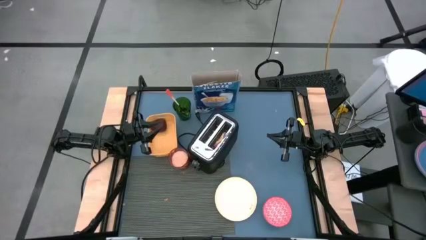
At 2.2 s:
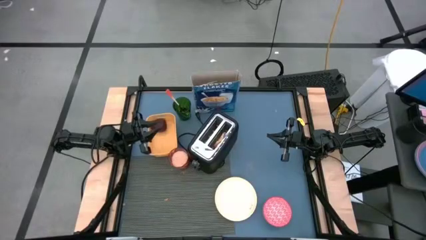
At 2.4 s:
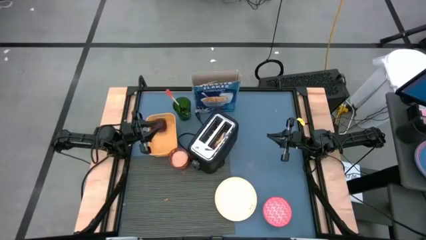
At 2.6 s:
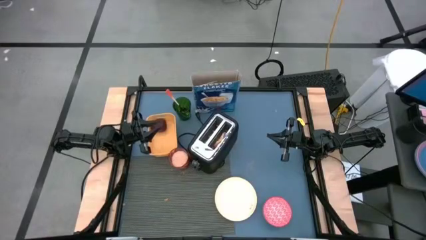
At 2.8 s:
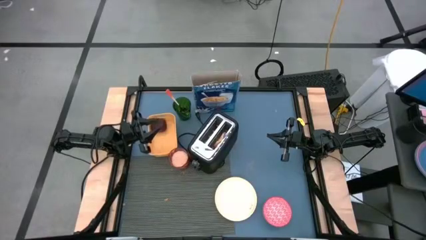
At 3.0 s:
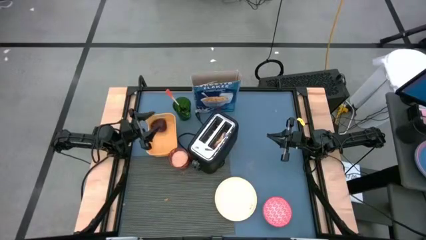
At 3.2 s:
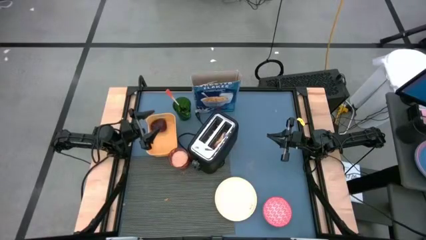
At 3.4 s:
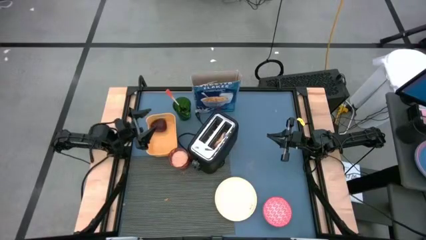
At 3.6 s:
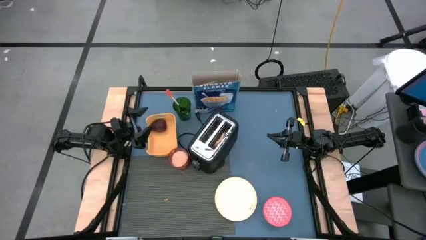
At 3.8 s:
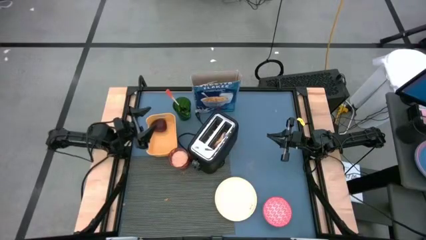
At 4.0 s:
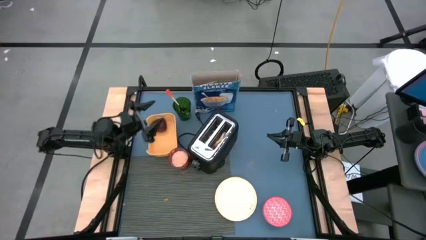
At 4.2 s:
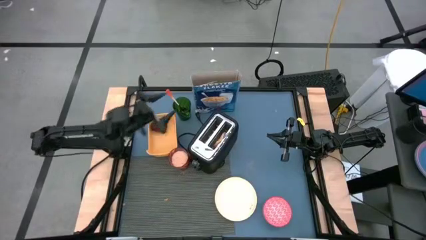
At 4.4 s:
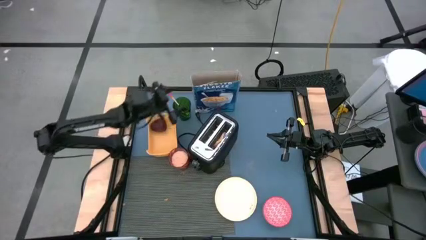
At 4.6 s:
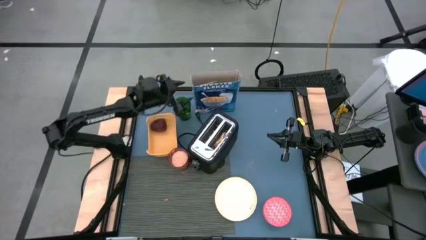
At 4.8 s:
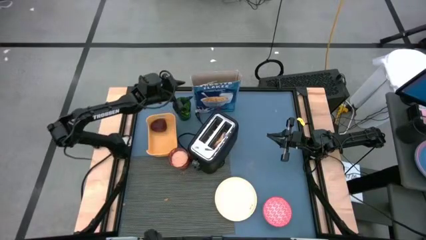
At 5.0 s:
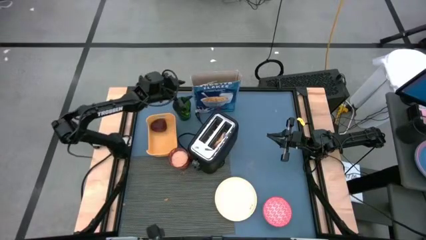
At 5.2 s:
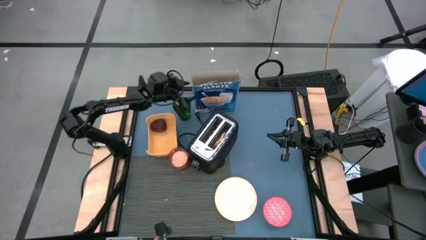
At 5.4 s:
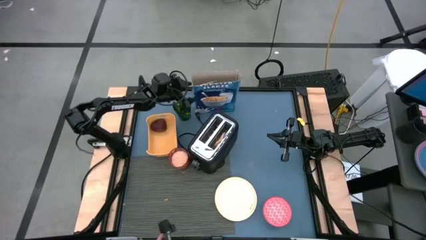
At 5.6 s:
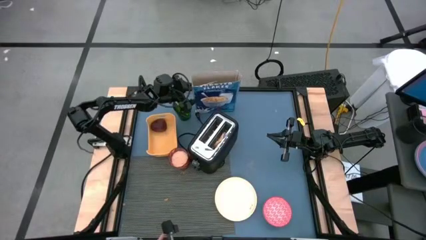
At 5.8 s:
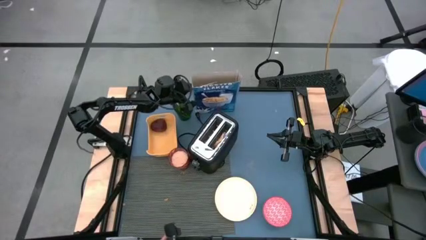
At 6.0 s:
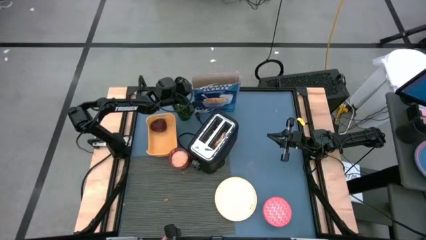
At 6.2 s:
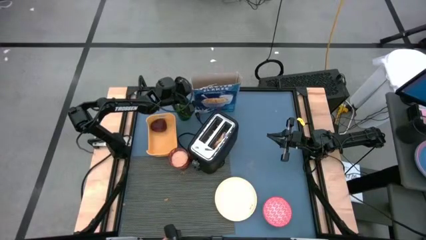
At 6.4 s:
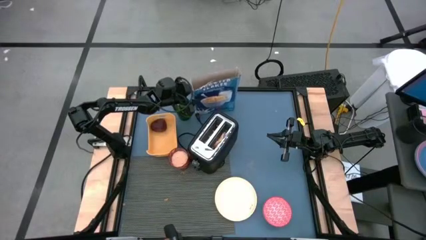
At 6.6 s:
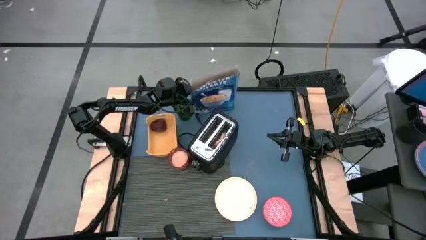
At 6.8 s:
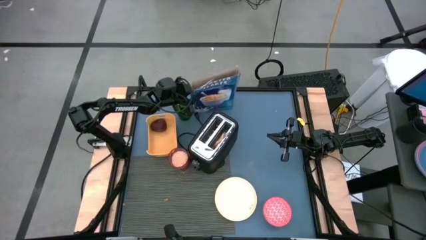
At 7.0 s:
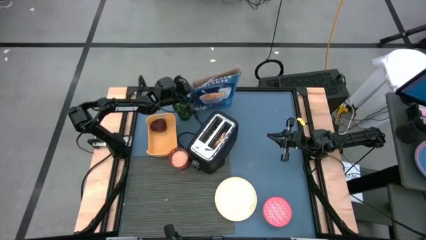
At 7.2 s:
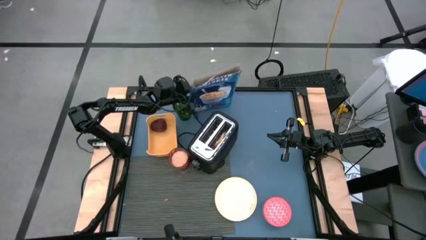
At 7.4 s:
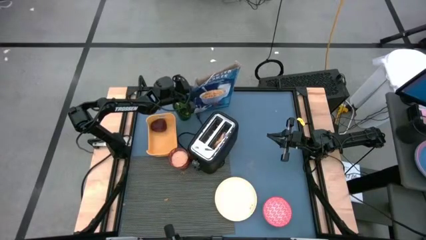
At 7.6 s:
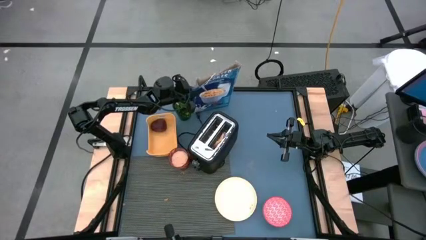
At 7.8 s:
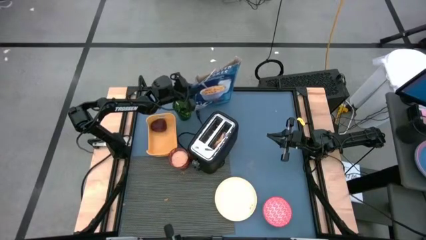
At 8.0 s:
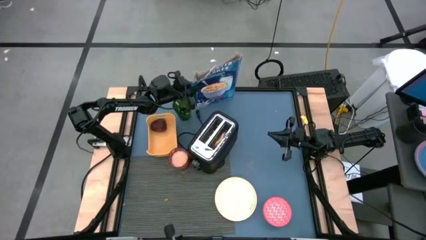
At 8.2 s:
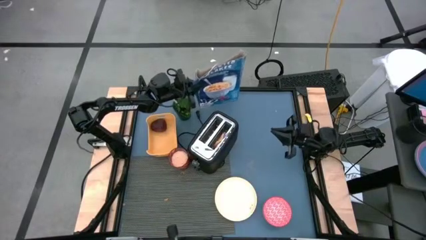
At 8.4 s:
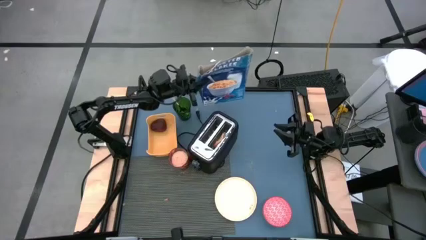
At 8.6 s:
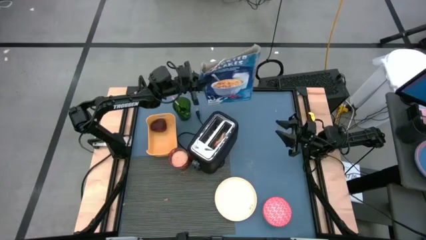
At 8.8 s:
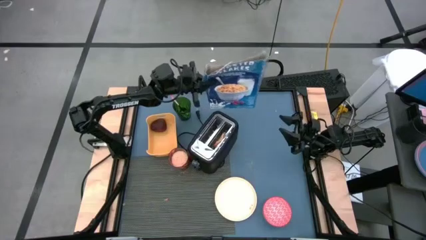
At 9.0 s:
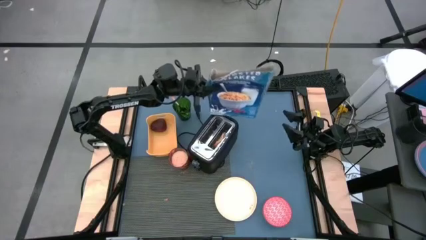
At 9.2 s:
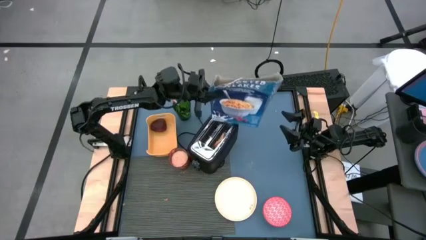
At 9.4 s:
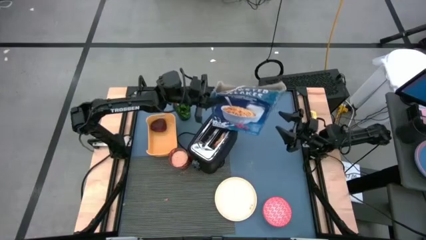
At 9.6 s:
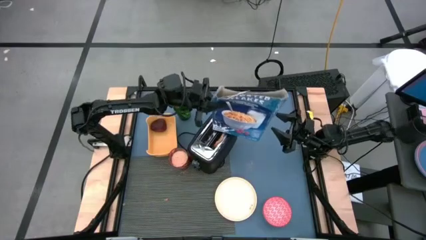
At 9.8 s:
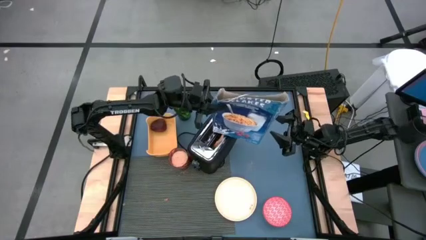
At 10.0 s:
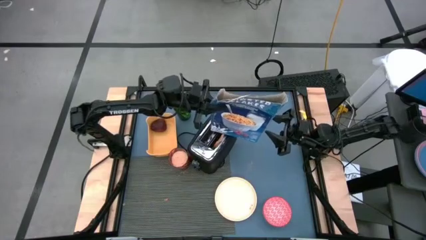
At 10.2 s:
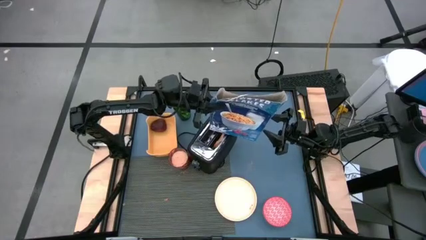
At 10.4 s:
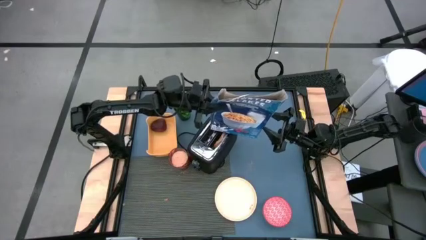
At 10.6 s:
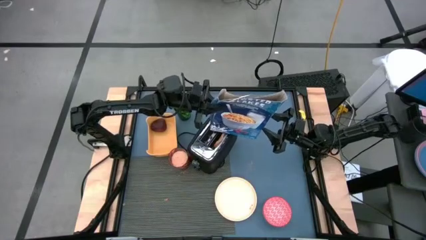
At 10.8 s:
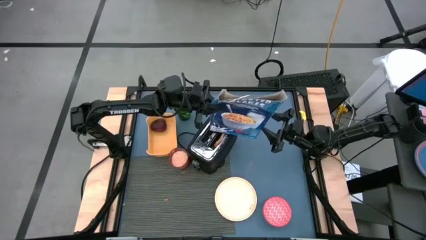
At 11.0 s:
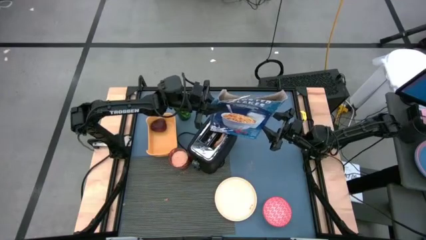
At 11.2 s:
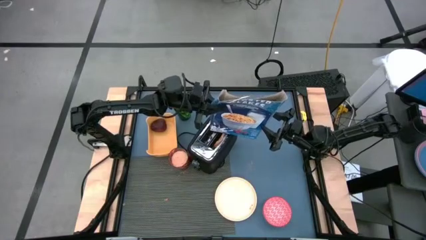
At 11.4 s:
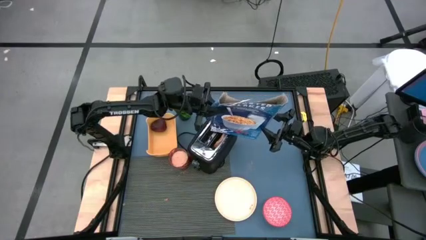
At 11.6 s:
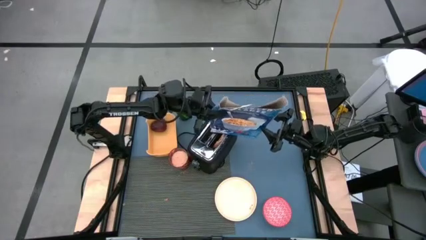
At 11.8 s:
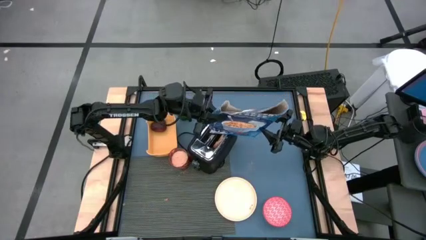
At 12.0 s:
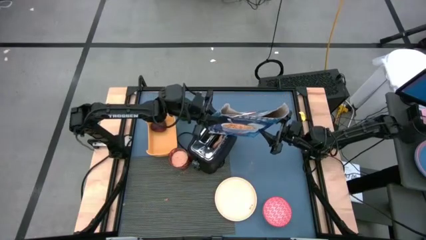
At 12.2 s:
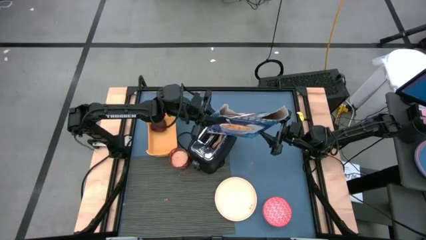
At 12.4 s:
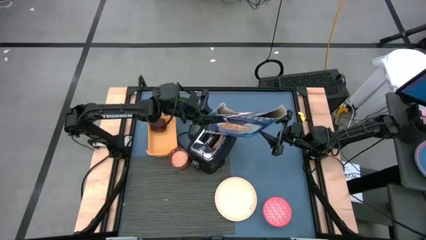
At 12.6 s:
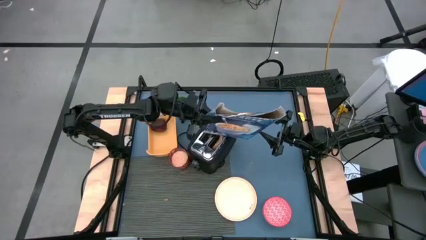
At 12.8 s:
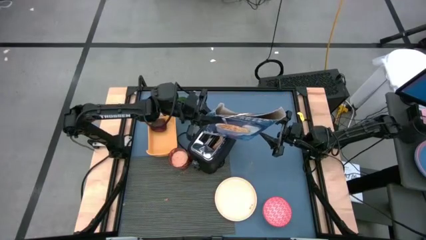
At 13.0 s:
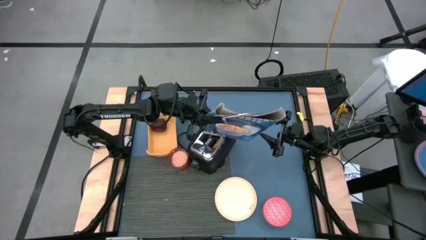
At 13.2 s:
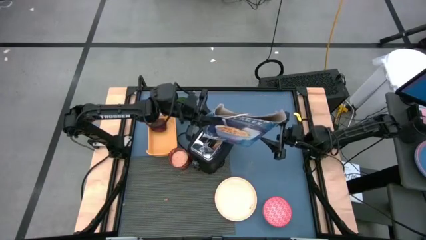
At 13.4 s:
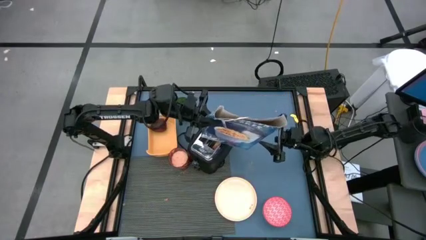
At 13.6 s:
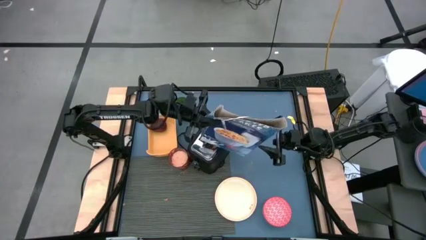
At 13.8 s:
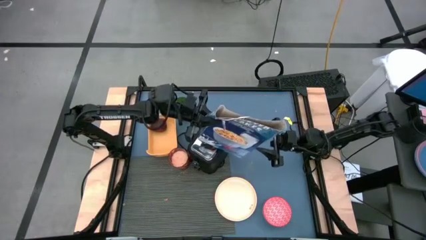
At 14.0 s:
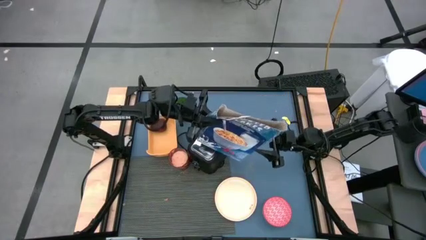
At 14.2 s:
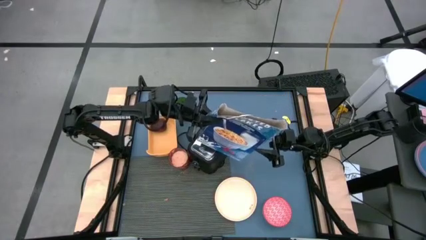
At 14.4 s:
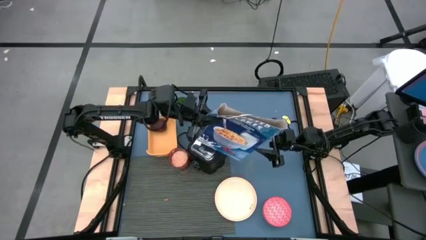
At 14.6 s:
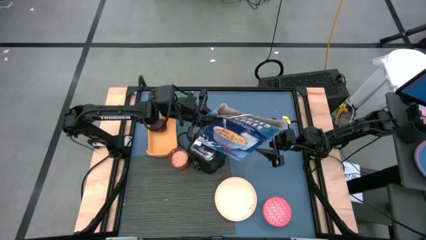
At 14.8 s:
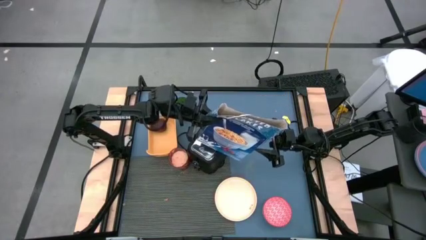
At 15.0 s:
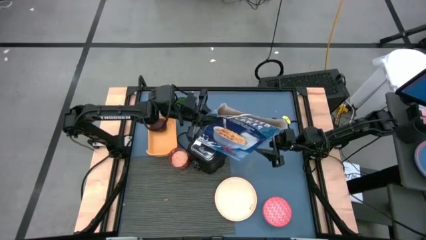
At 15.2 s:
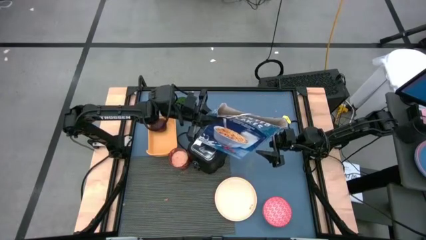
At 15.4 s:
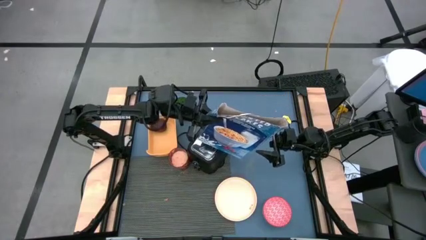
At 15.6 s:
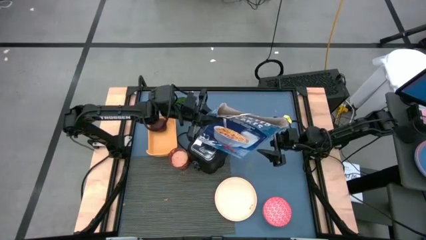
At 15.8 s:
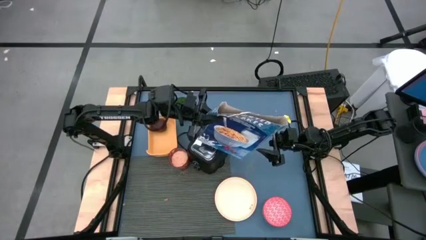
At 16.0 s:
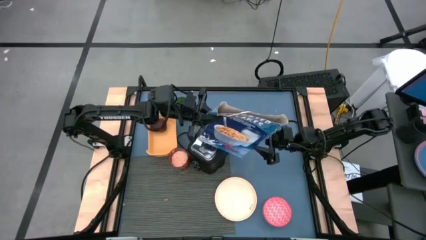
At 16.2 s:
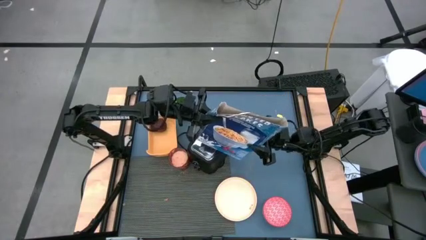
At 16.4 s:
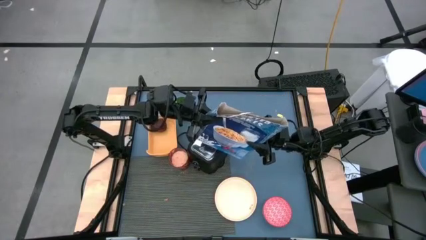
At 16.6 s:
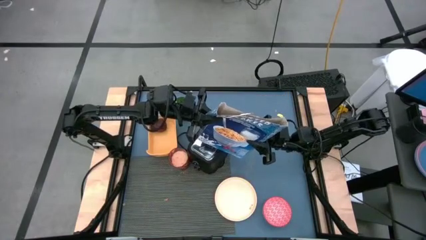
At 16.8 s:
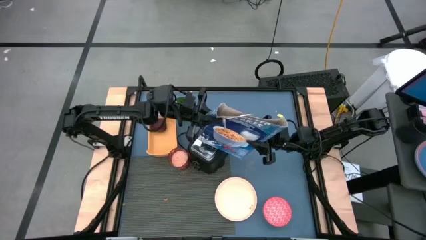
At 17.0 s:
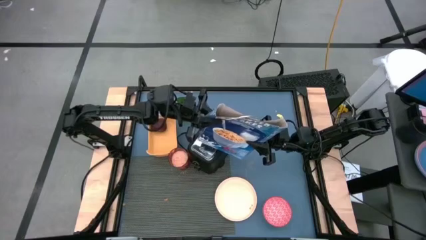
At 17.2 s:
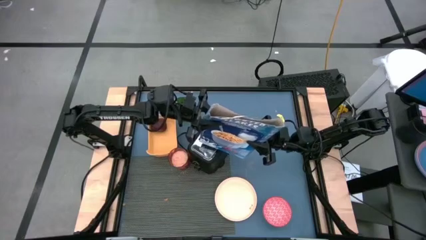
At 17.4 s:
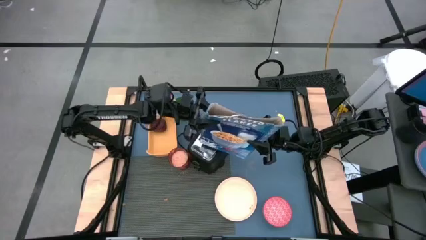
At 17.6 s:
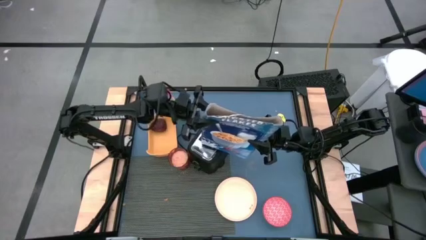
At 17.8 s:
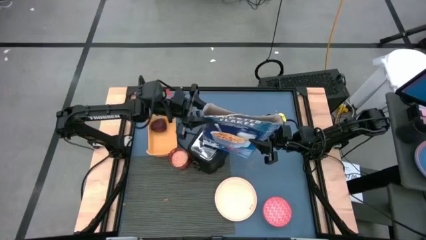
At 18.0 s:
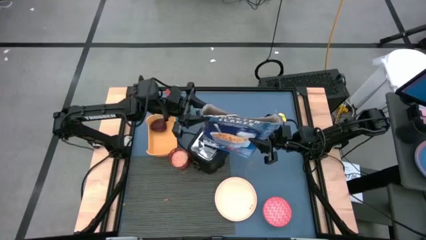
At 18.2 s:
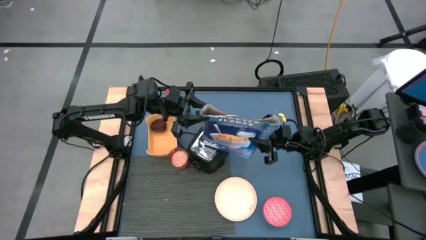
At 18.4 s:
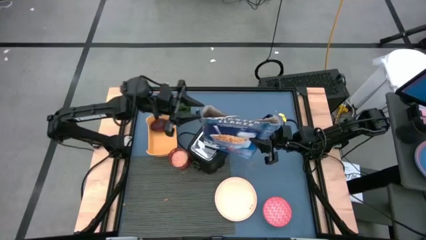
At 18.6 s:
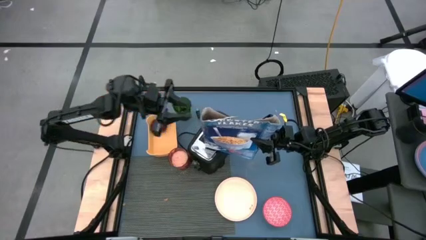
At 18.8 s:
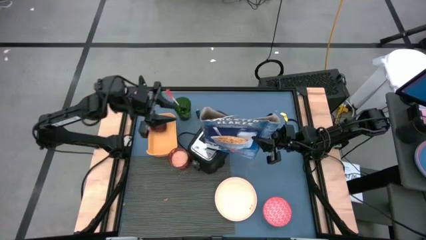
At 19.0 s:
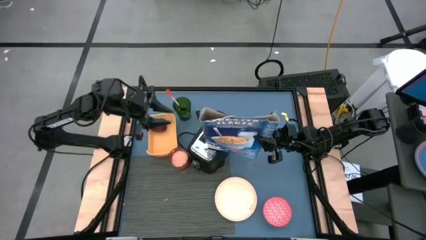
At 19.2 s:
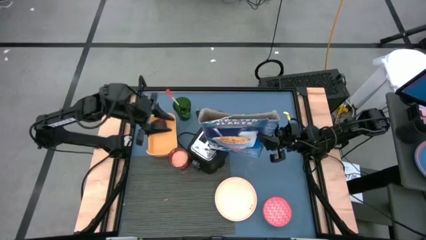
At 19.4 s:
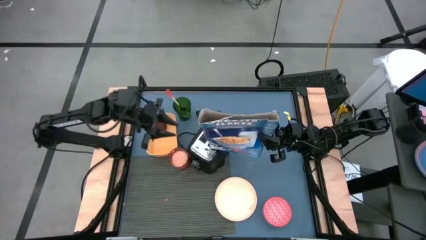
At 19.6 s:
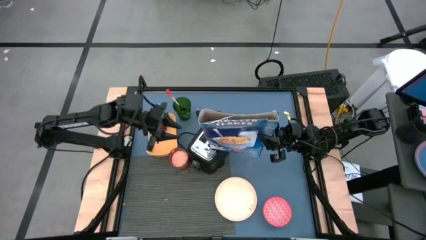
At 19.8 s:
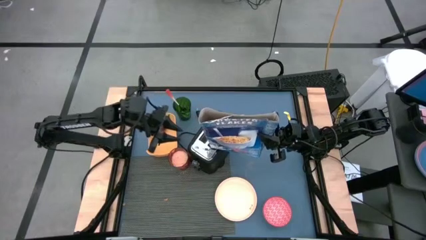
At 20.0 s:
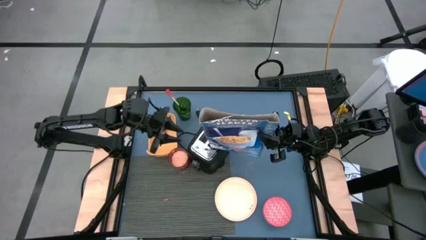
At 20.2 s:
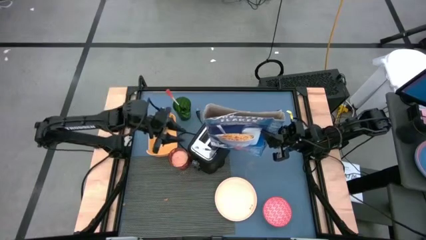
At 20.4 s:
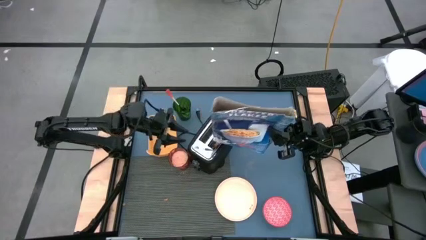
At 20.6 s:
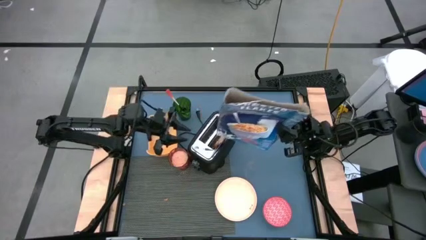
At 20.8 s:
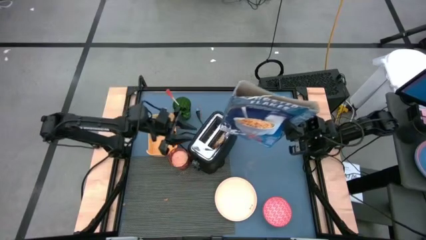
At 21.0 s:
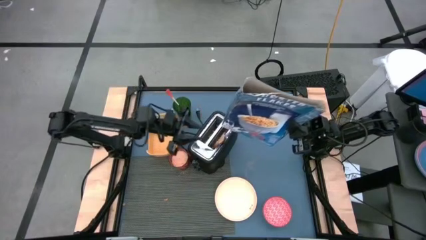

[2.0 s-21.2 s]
Task: Arrange a breakfast setting
Put the cereal from the blue cereal box into the red bowl
